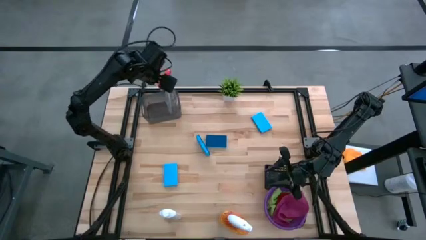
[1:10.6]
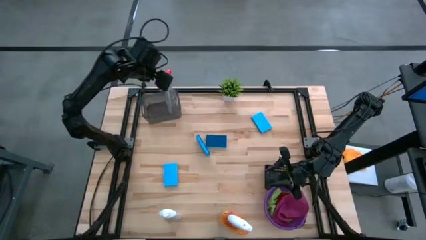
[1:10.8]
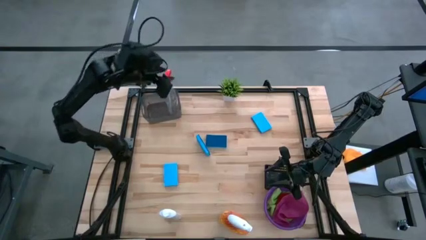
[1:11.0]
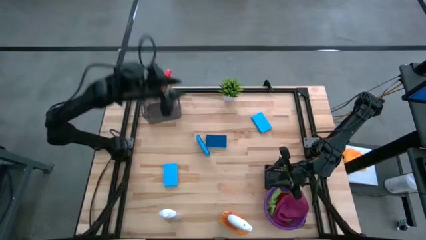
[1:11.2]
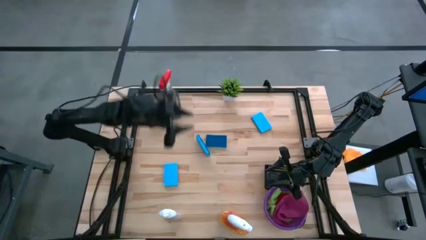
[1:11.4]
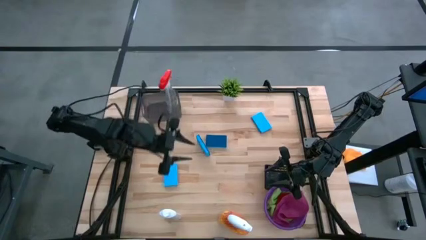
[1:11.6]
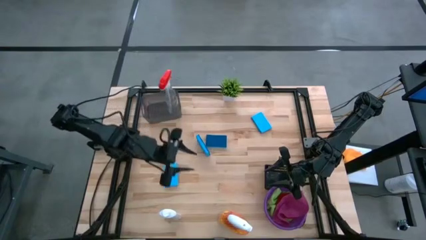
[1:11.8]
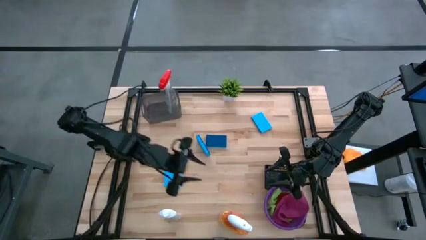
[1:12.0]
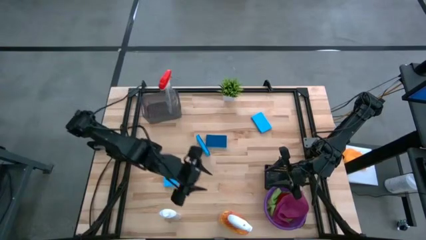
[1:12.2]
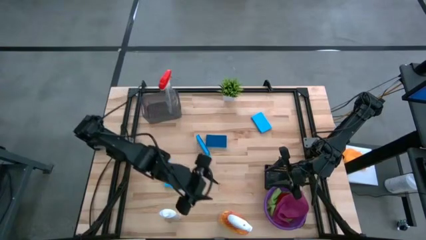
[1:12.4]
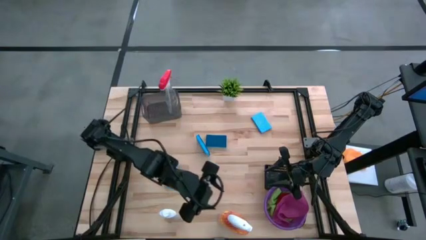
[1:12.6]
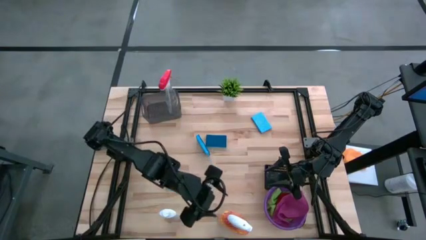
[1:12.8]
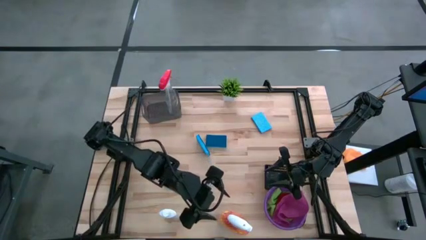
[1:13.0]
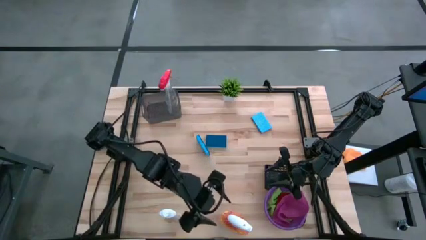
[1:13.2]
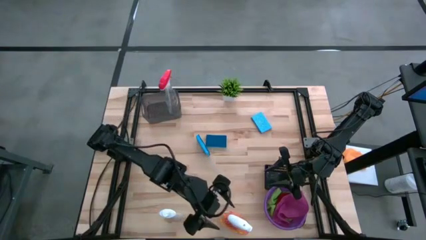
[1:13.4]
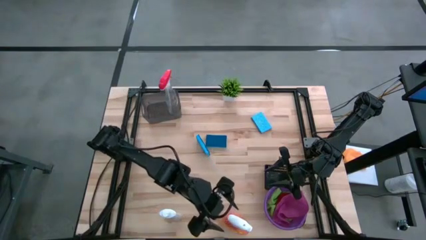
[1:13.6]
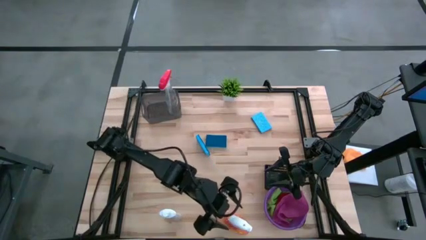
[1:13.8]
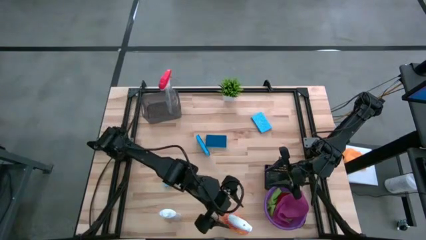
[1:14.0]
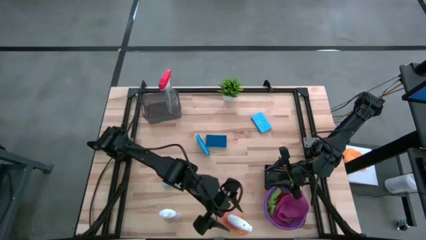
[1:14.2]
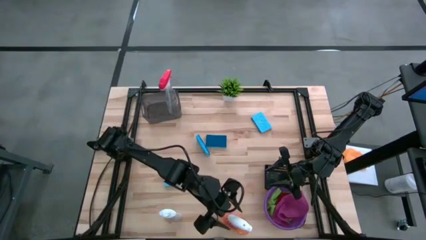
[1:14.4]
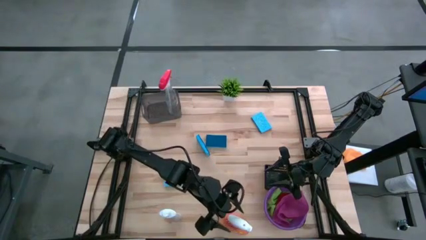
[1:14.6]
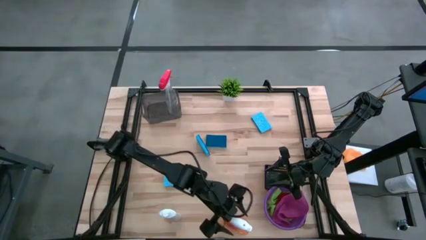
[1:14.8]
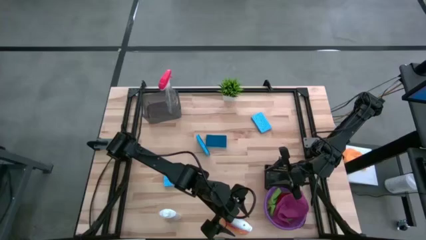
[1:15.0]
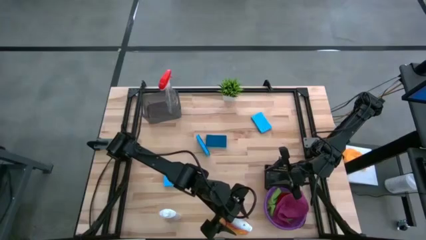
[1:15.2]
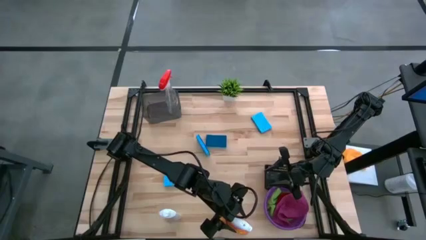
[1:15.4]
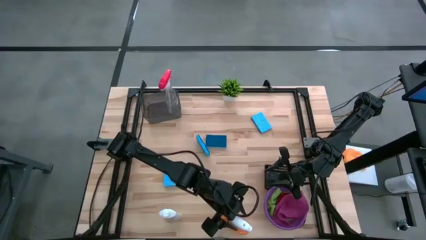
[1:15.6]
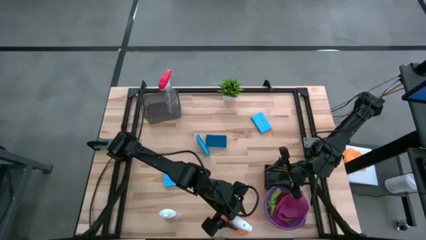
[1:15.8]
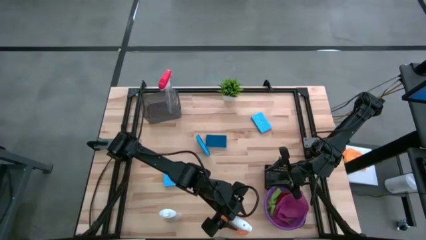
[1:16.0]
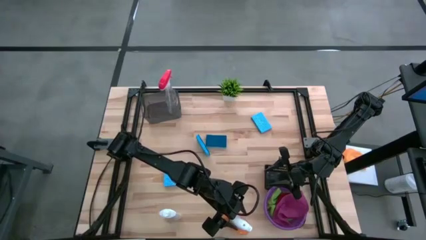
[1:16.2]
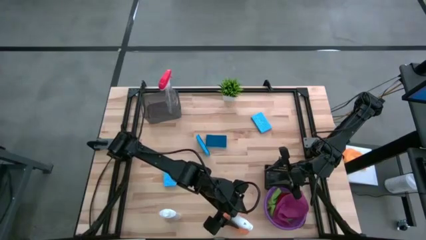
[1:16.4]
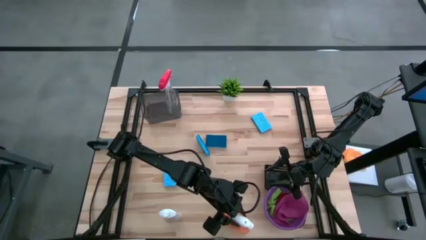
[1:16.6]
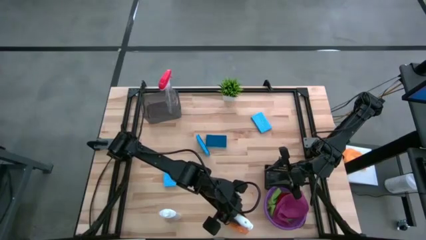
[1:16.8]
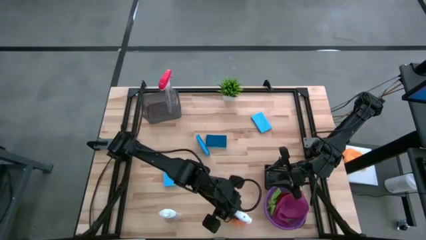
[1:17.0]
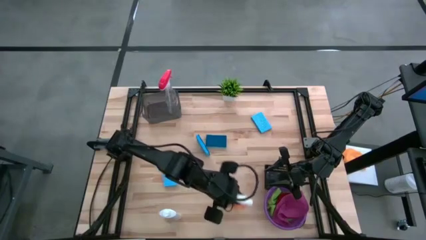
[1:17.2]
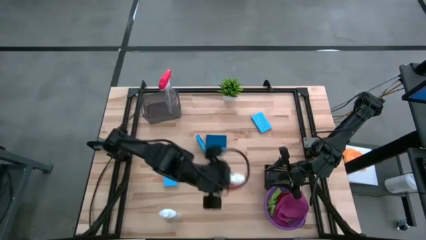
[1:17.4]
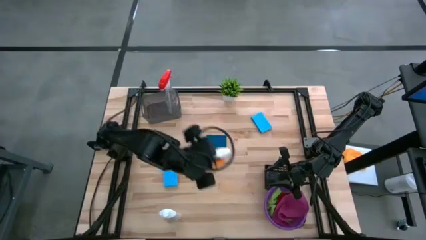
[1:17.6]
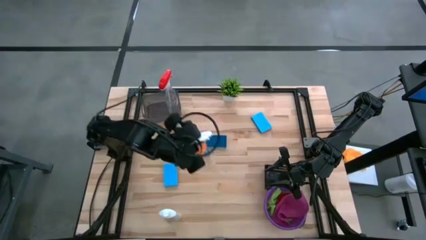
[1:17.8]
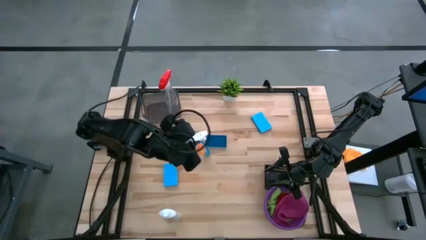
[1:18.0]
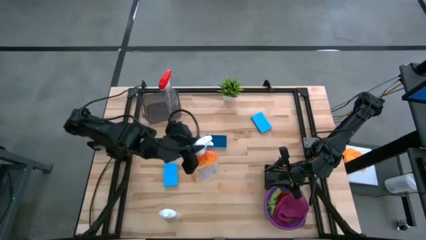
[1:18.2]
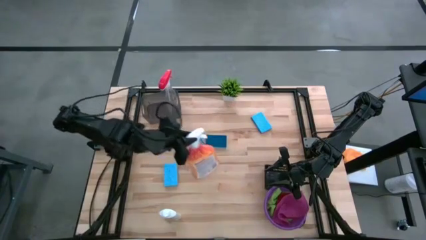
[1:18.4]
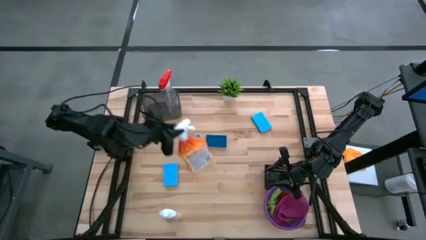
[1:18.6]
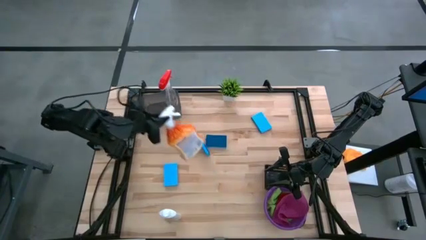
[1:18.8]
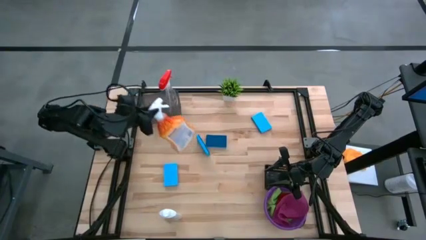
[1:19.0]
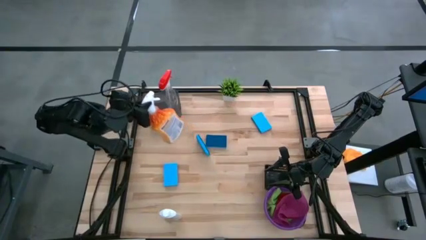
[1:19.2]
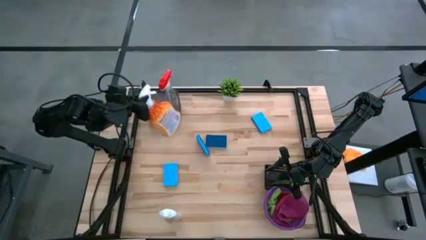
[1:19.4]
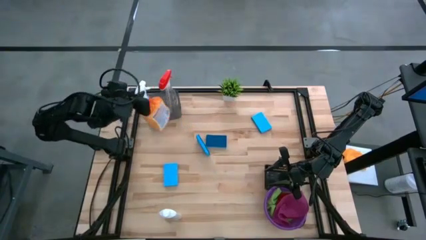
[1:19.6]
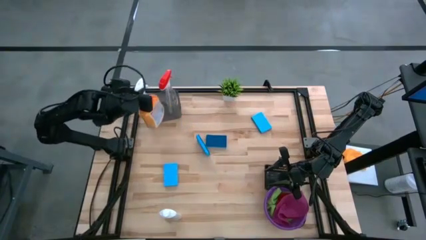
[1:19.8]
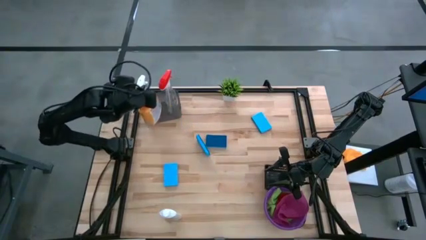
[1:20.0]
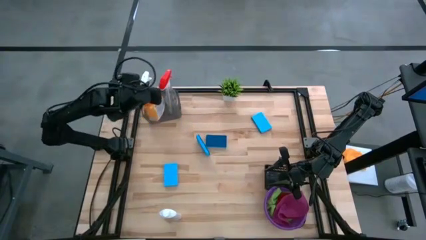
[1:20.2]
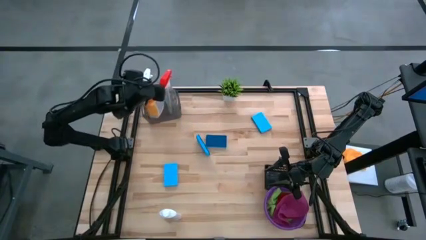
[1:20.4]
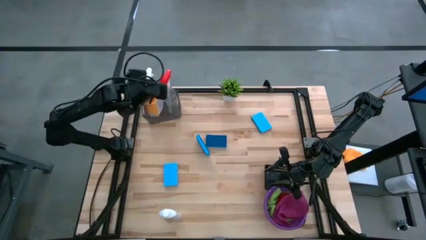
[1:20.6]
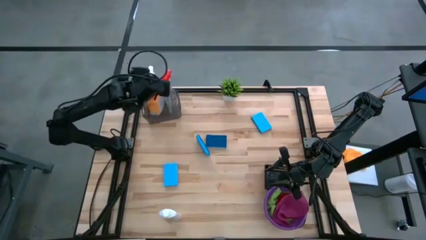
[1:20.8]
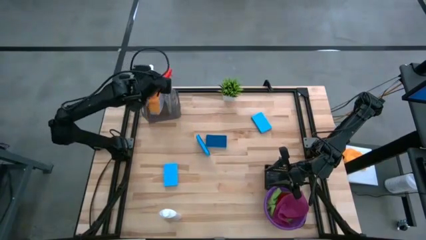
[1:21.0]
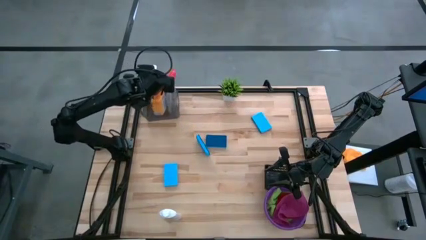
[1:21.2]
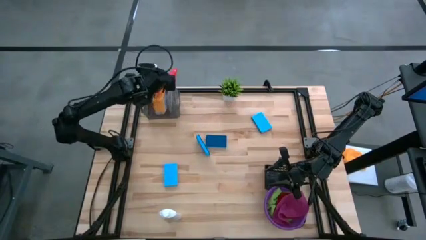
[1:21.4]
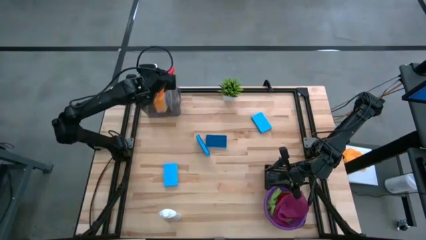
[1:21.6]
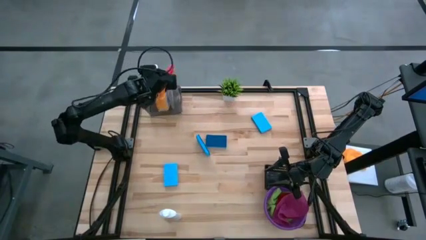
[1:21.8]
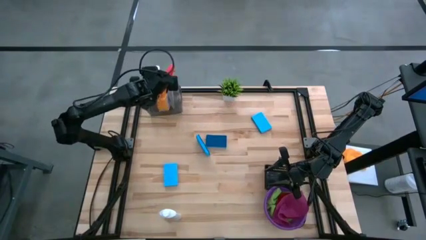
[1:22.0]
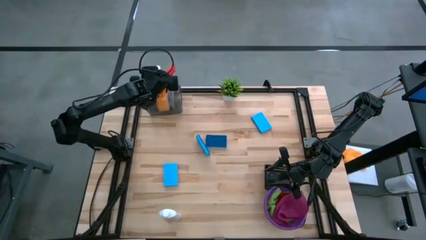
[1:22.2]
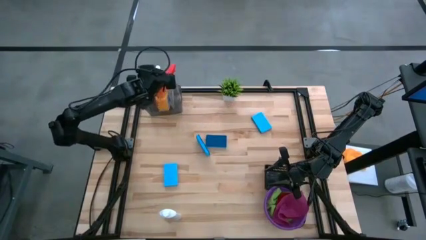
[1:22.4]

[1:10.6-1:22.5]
Task: Pick & Place Kitchen Items
Put the orange spray bottle into the gray bin

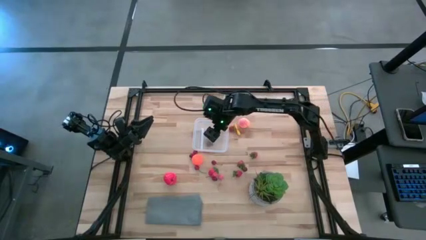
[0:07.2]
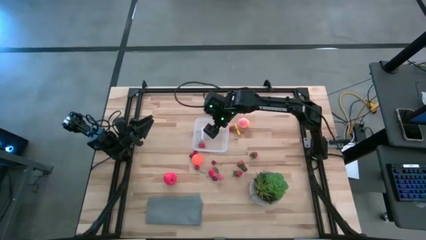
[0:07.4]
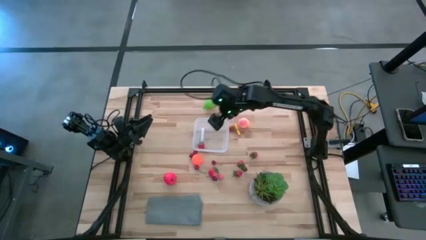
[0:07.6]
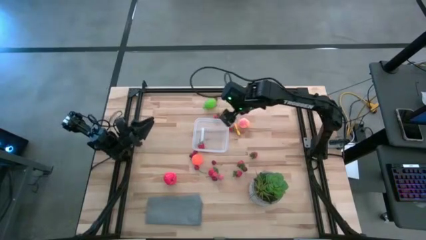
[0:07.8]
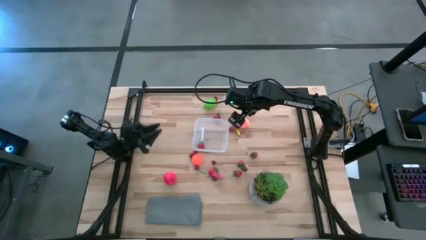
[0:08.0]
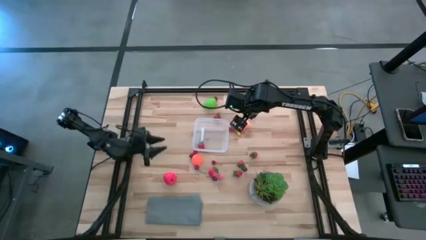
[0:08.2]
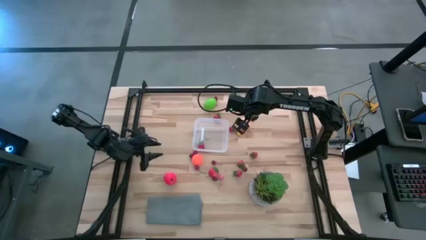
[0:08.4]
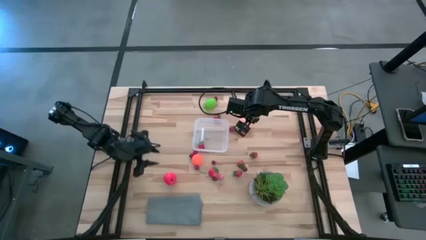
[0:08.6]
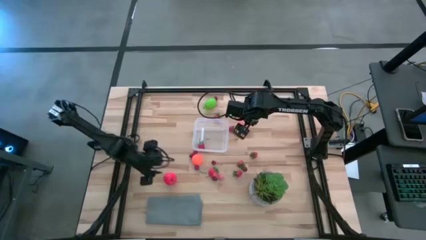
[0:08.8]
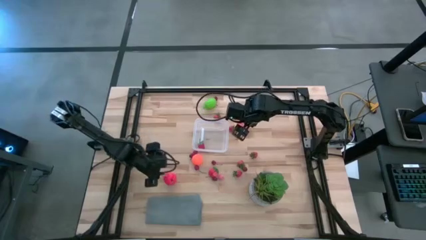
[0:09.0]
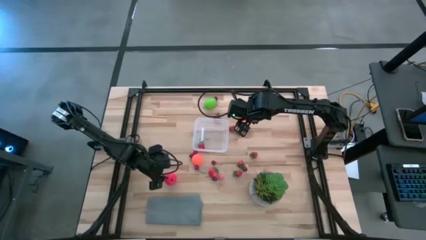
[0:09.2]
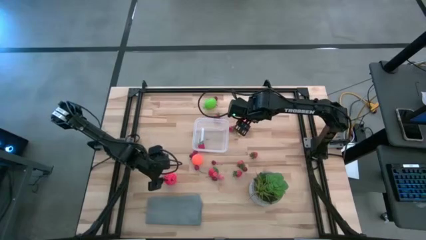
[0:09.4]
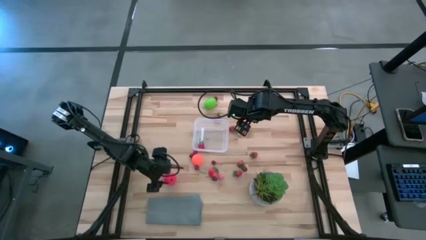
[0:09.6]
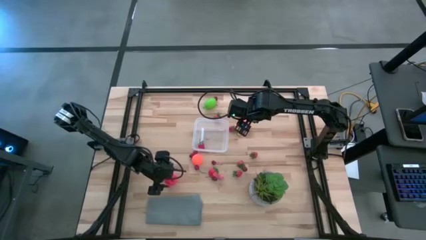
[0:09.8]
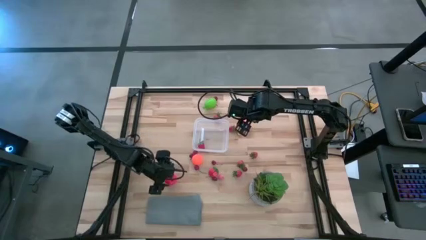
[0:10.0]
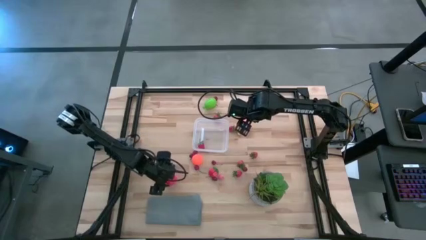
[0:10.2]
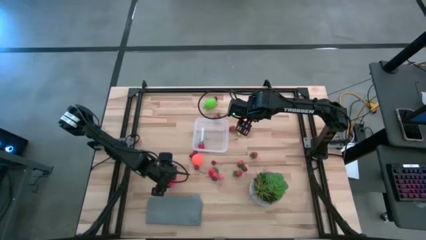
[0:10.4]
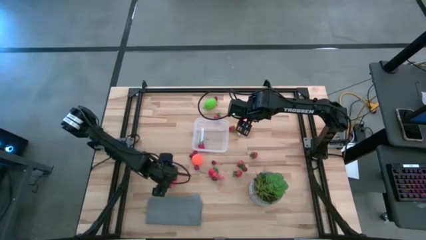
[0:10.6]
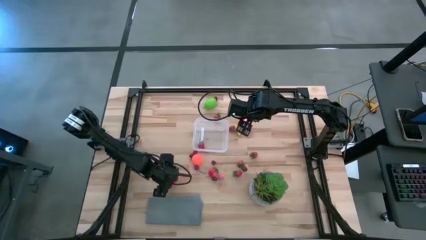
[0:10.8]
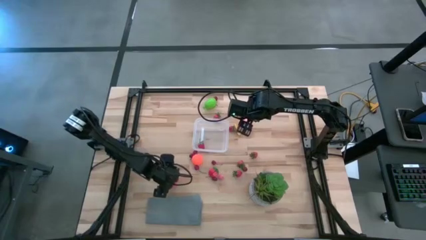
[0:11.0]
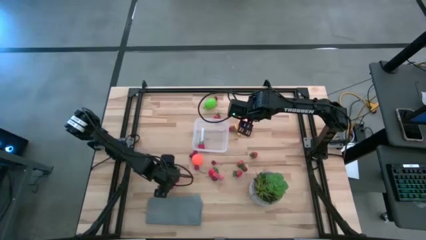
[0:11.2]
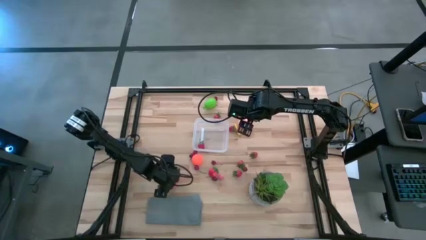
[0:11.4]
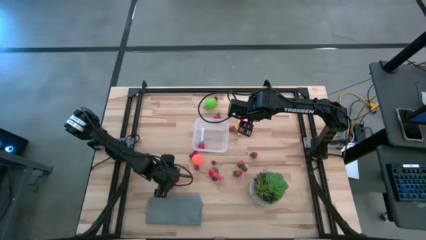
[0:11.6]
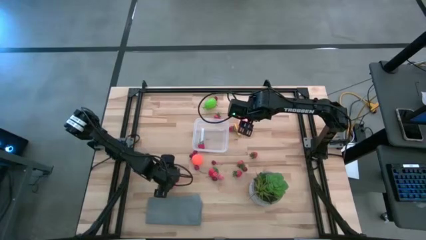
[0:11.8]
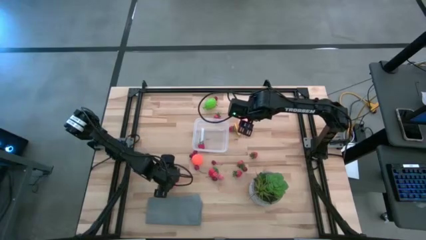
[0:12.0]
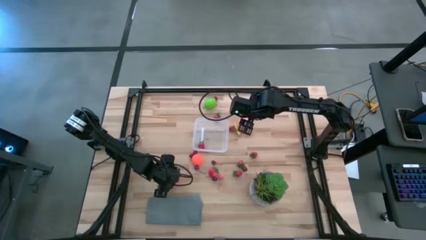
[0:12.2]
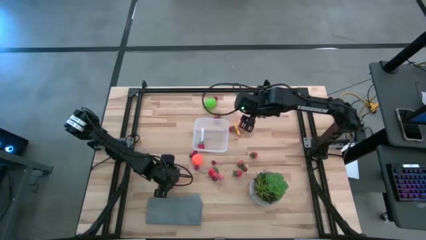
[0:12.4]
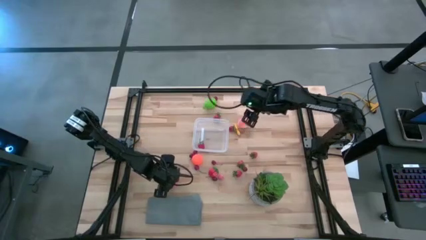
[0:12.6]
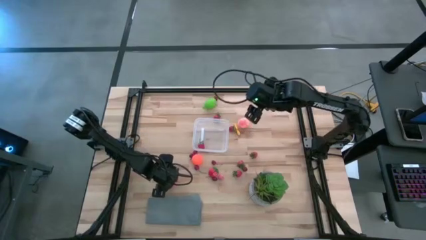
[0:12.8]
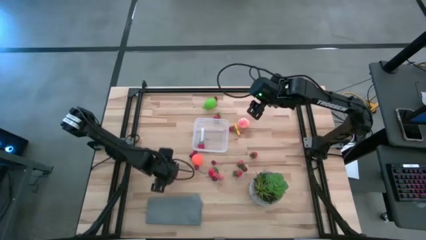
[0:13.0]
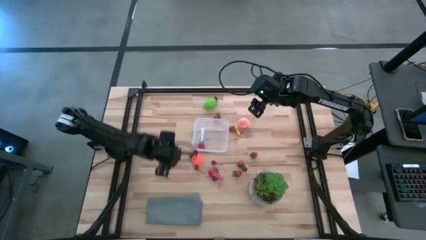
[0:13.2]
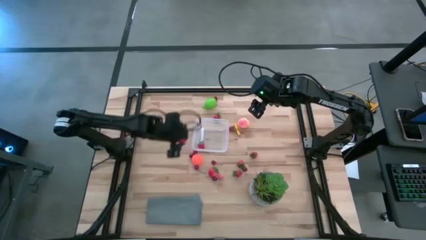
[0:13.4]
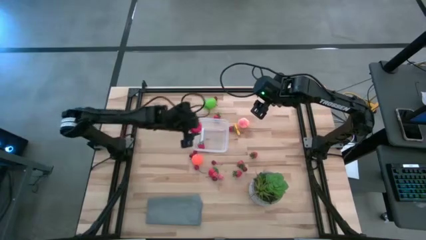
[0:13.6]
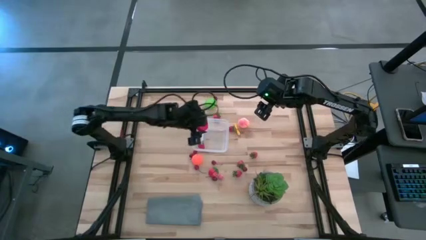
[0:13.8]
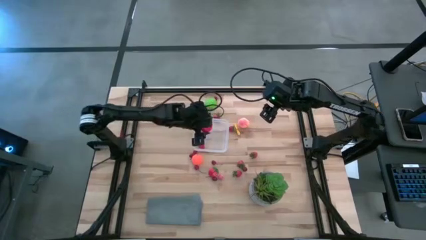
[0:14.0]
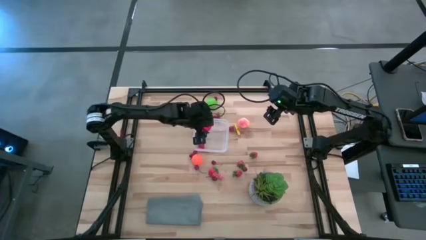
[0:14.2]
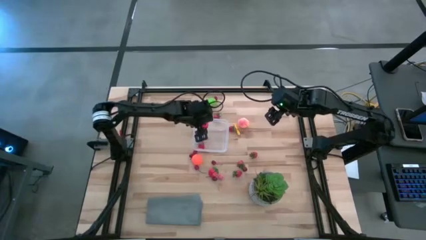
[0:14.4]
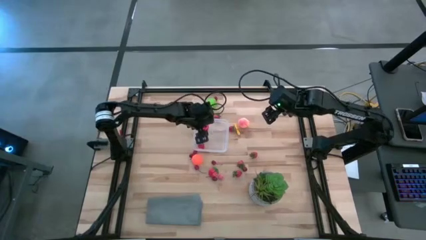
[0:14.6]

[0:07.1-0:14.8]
Task: Pick and placing Produce into tupperware
Put the red apple into the transparent bin
